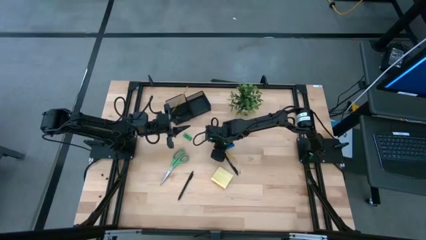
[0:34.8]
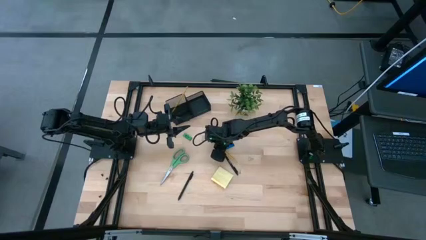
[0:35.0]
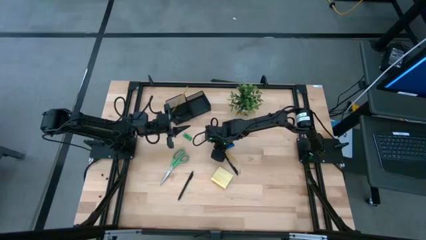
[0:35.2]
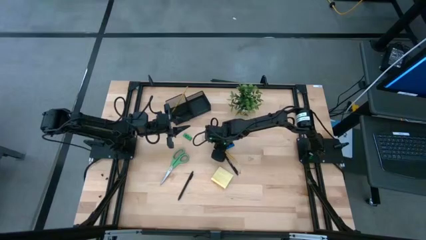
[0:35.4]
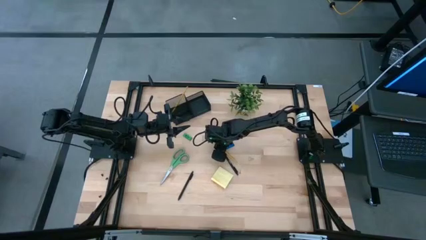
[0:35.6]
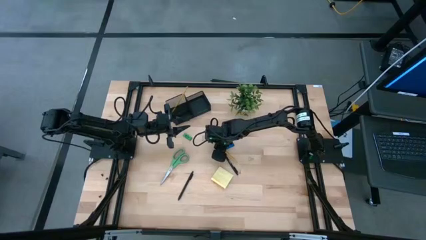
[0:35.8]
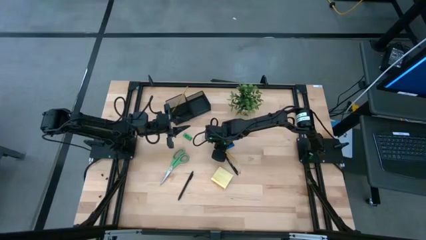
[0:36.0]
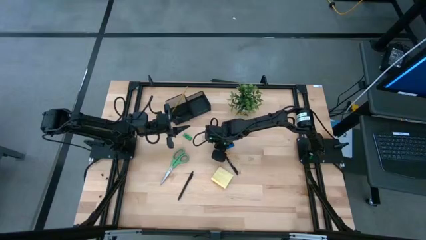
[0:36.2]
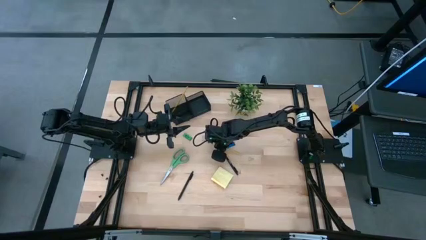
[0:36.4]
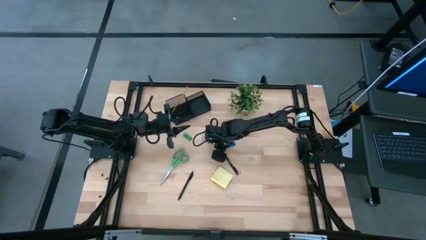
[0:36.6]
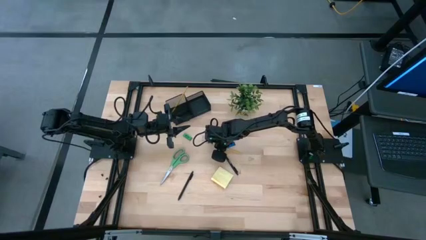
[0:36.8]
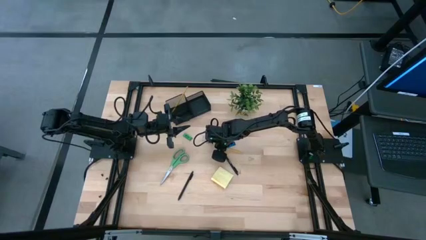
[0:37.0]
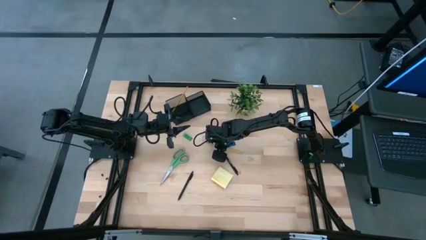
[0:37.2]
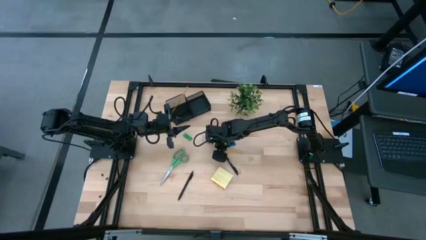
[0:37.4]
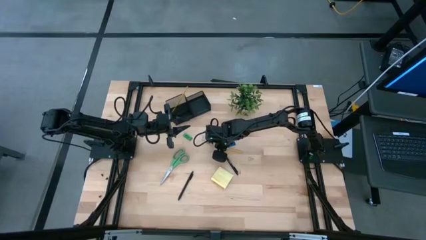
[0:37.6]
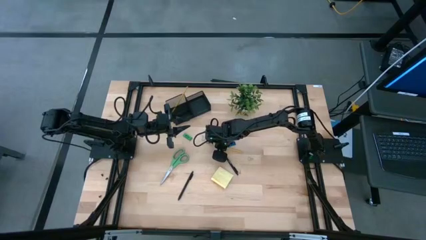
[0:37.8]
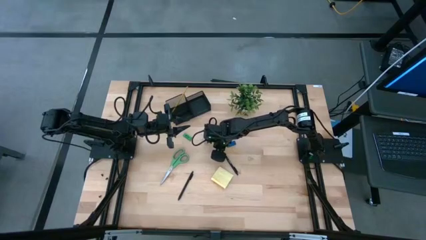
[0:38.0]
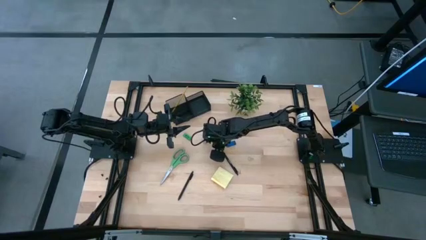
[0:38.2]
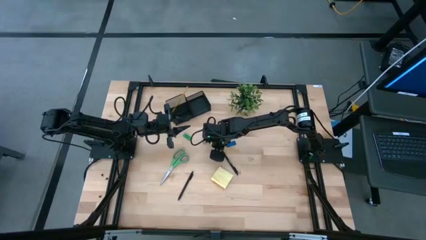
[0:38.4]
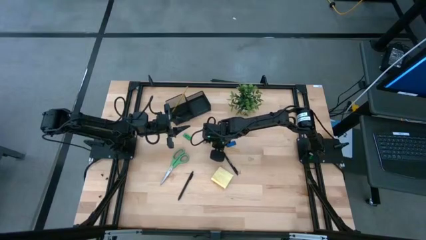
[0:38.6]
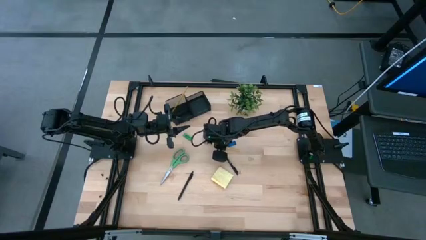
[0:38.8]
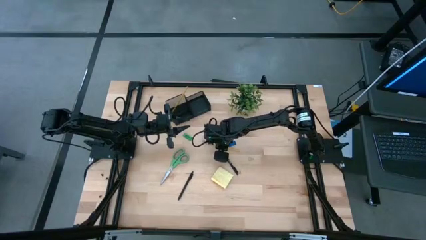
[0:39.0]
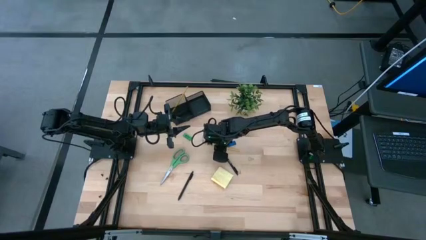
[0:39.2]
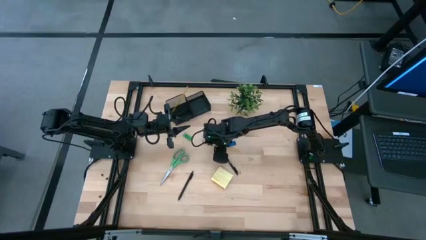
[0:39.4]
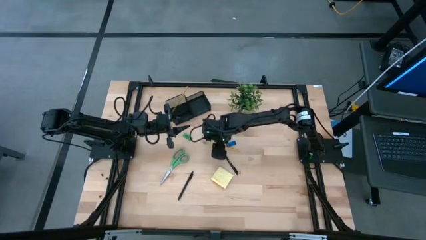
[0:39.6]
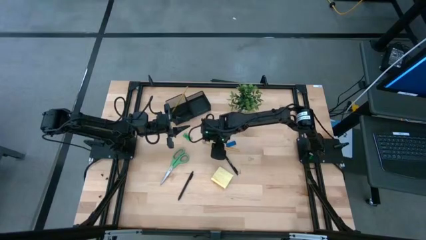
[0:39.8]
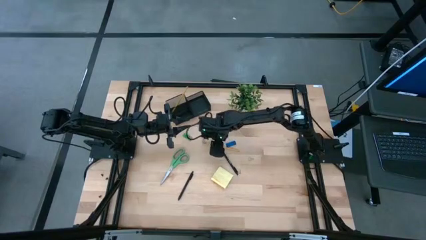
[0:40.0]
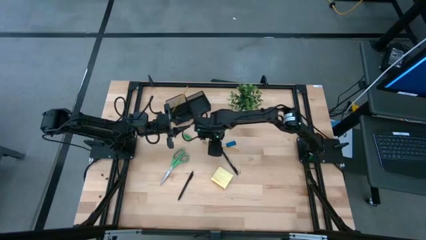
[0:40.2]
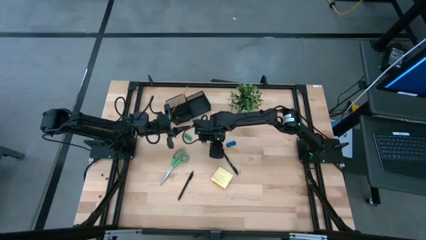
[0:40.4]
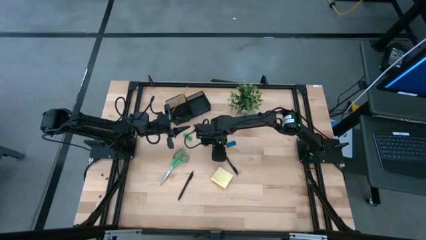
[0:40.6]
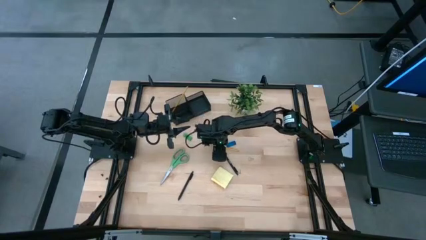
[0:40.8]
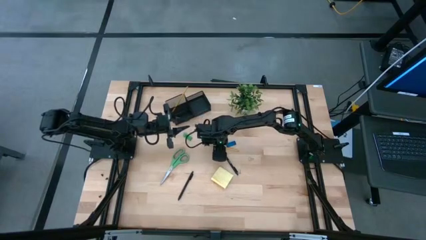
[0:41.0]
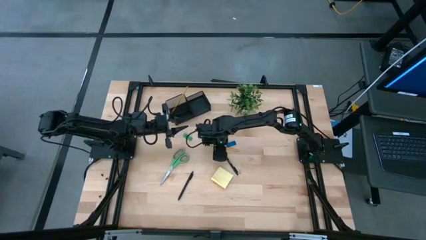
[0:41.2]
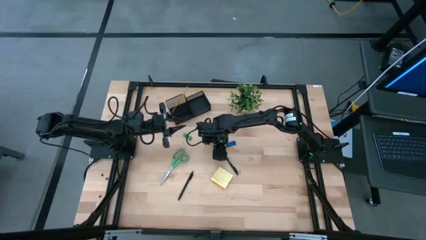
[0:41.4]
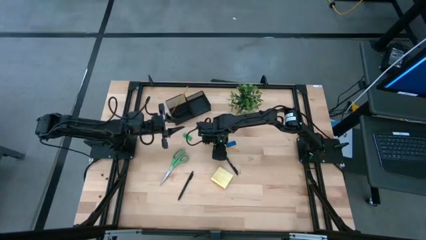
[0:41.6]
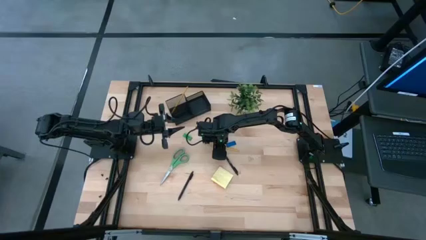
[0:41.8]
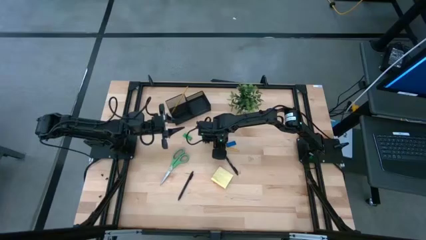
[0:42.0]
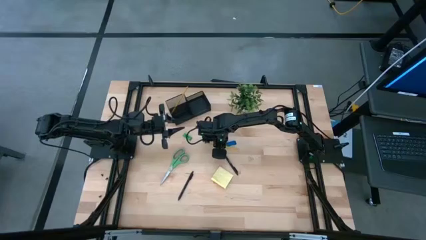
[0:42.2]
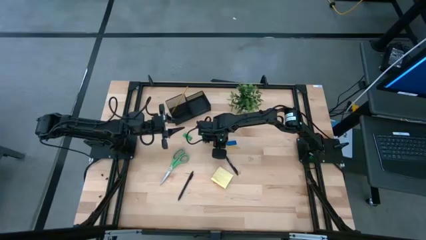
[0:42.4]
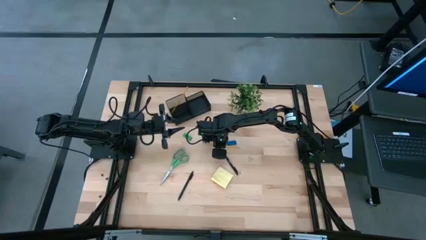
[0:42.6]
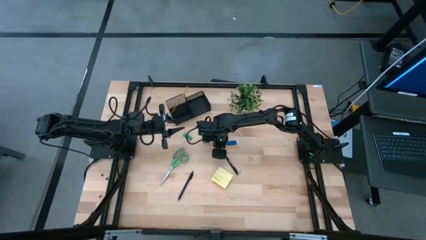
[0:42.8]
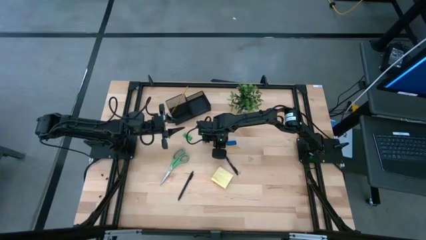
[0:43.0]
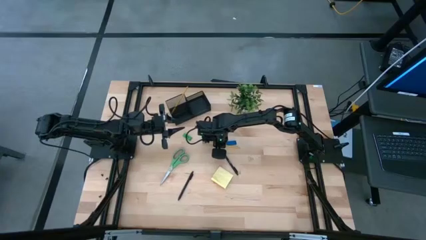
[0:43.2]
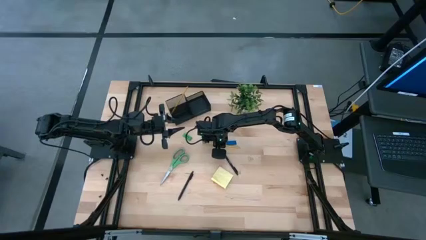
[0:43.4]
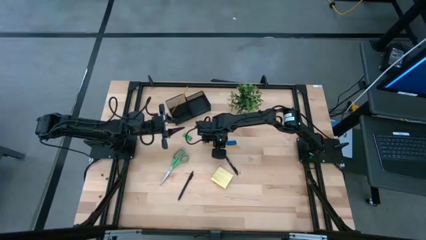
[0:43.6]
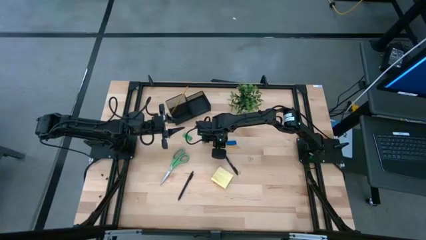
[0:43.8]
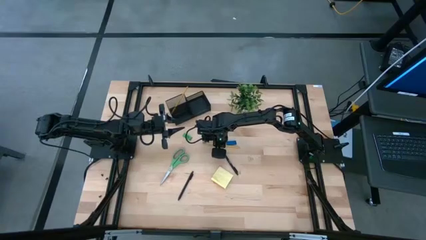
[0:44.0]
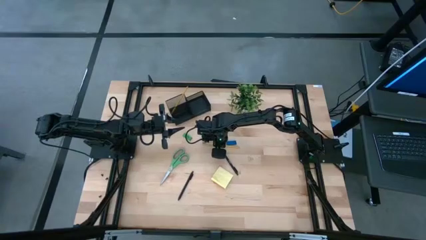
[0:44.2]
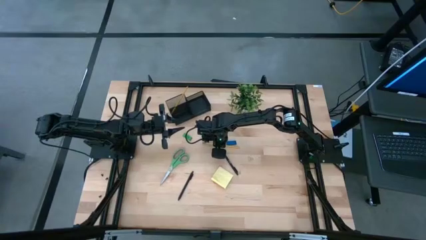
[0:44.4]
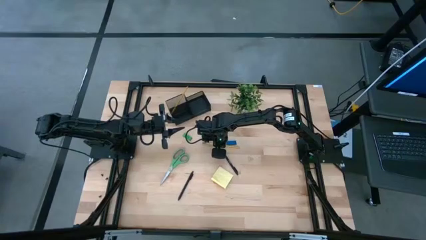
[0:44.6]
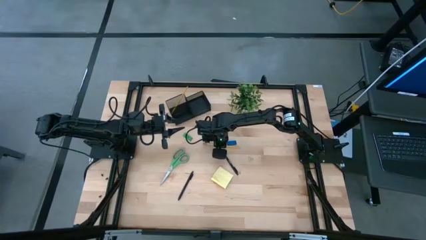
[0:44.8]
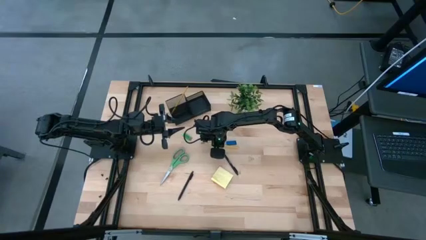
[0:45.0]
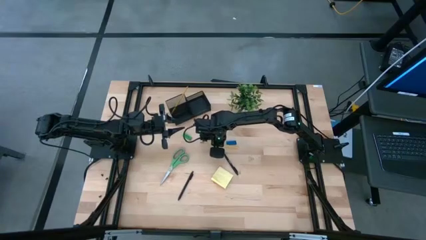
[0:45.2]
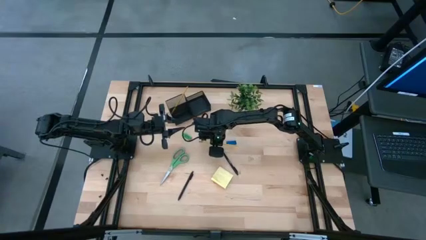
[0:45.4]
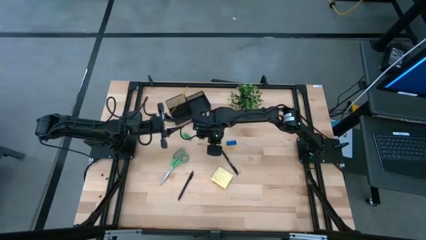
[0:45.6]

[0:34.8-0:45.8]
Task: Pick and place office supplies into organizer
Put the pencil into the desk organizer

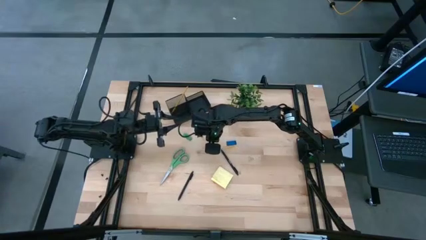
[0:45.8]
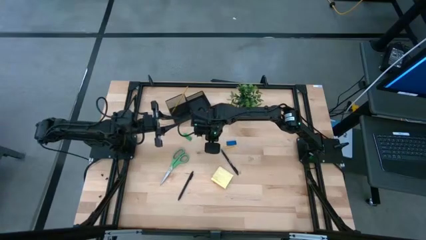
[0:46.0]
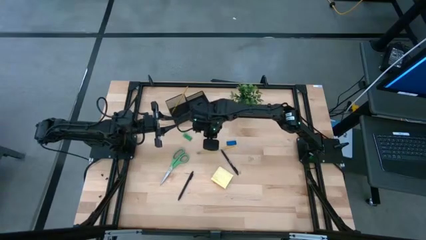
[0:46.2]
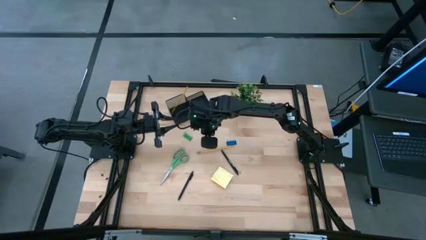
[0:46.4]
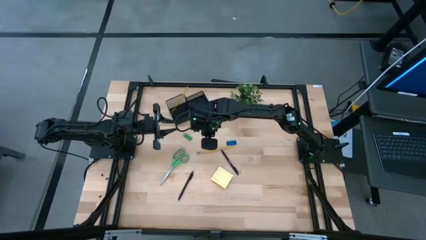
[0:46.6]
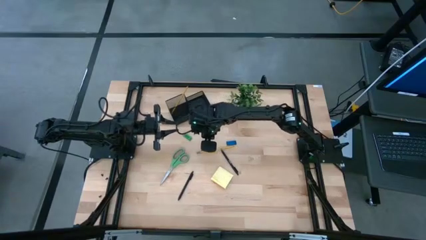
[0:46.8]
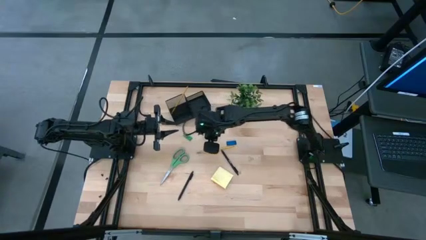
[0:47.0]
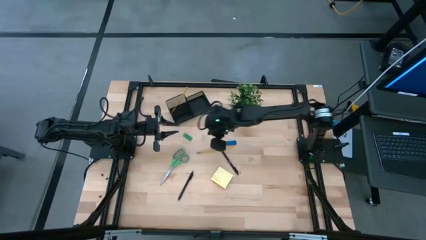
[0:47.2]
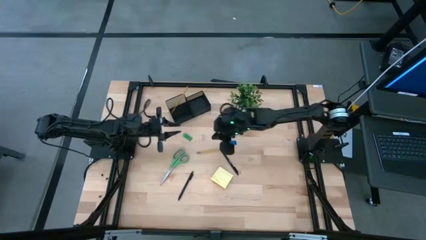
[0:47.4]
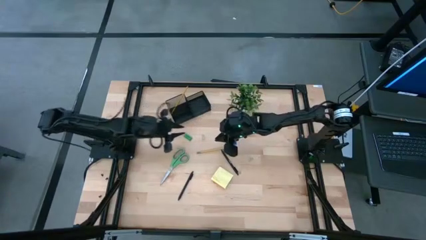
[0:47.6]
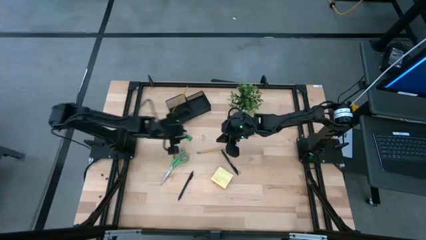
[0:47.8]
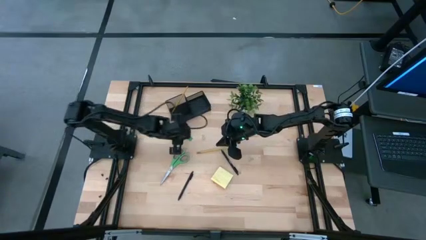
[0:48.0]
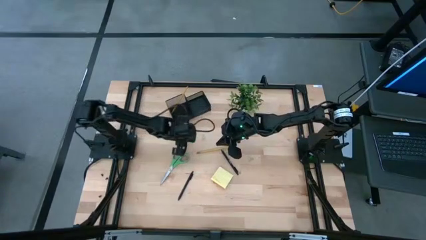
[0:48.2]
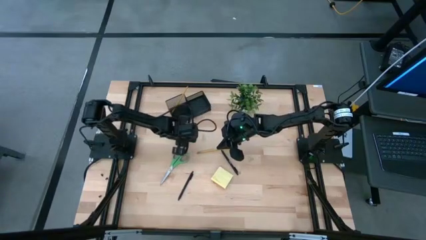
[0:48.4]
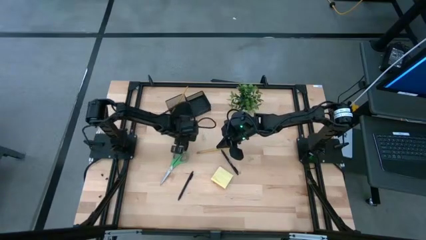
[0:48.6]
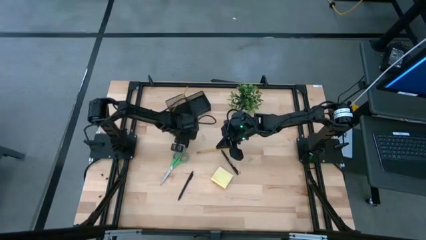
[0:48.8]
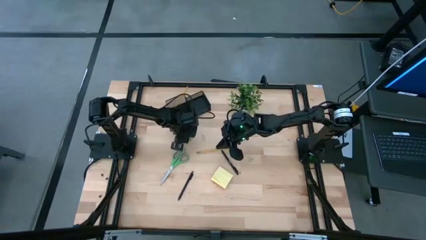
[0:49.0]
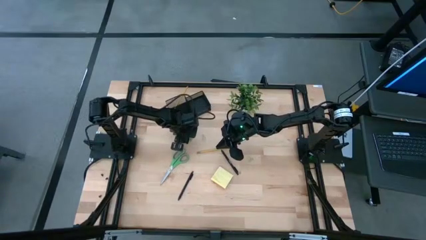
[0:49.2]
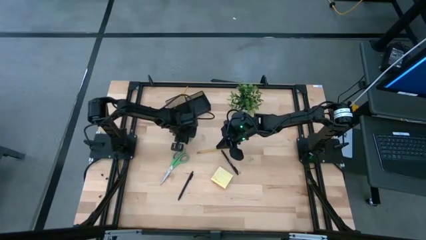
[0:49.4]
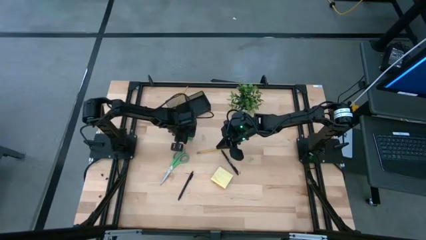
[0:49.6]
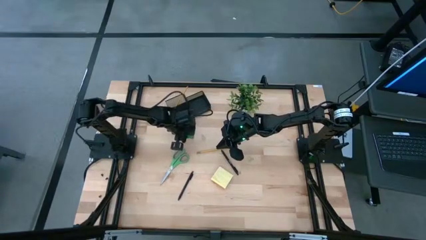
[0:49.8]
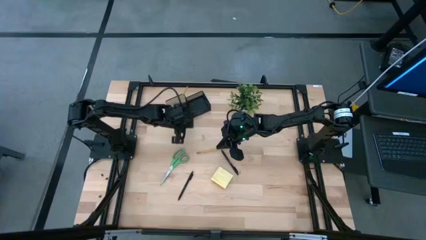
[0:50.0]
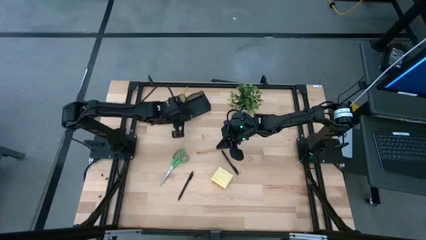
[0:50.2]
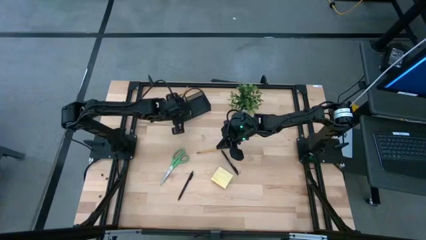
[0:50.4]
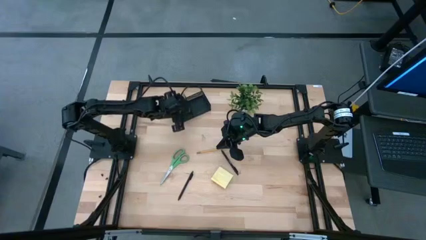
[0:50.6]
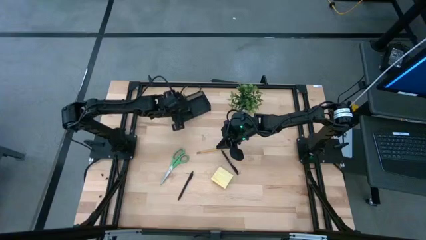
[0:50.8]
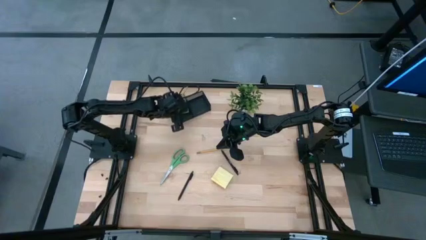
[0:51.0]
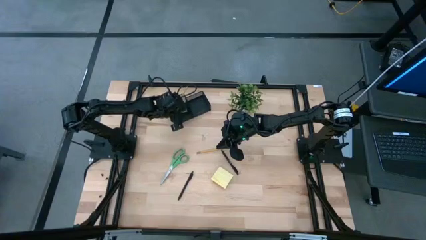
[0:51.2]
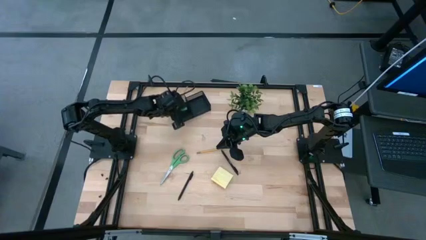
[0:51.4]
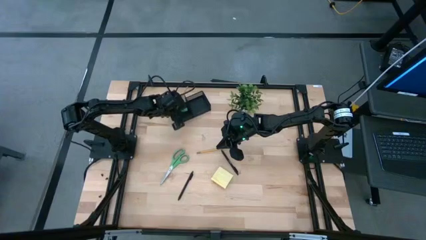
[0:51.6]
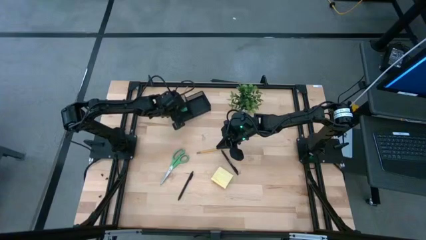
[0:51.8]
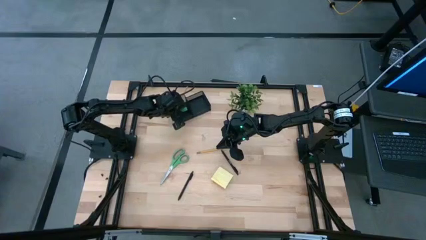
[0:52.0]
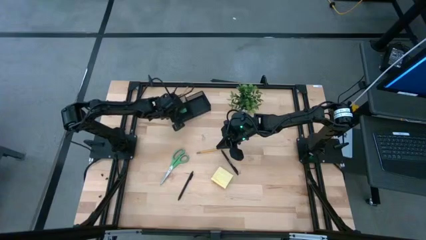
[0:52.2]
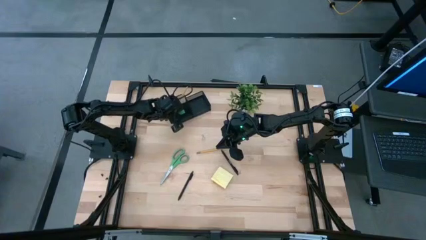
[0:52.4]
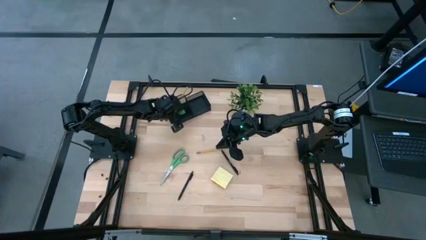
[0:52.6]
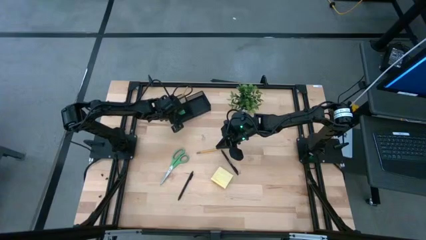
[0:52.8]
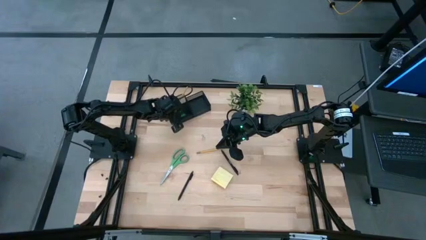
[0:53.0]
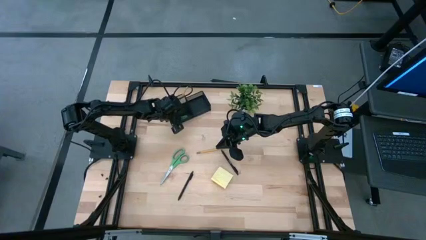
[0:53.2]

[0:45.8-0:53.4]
Put the green eraser into the desk organizer
